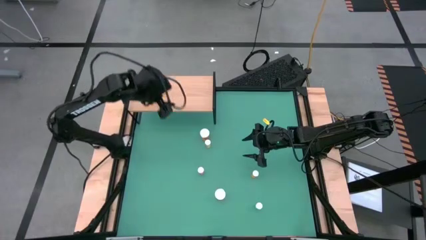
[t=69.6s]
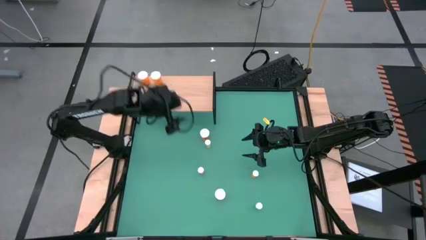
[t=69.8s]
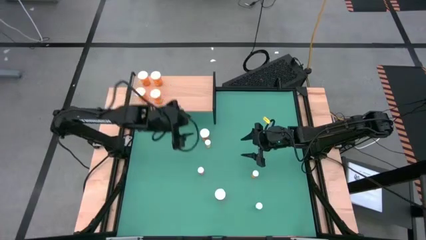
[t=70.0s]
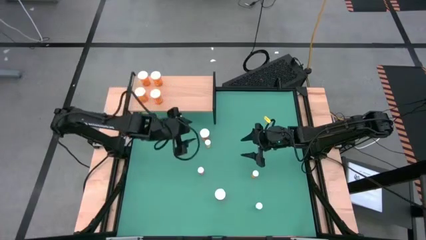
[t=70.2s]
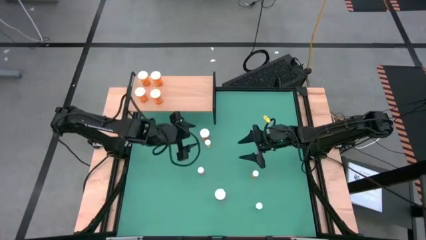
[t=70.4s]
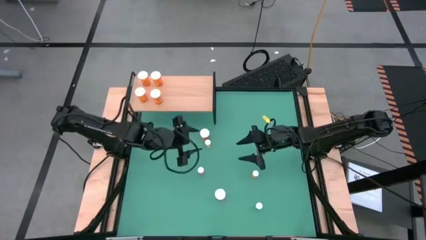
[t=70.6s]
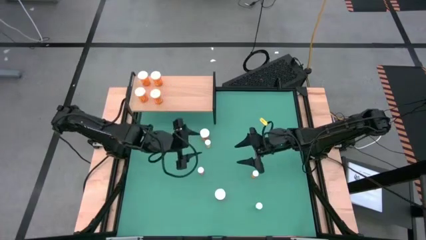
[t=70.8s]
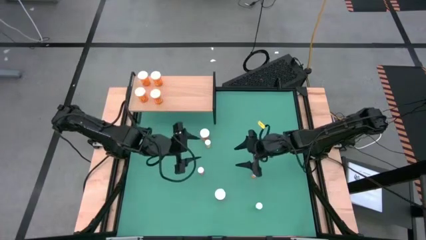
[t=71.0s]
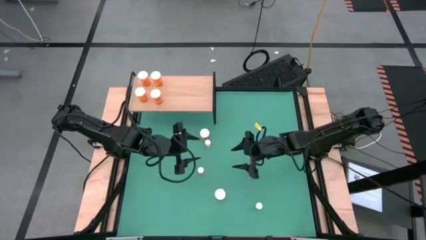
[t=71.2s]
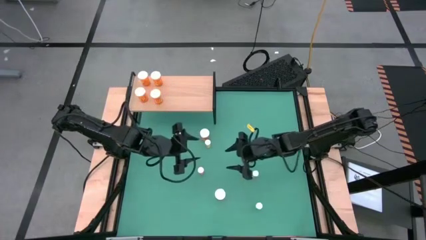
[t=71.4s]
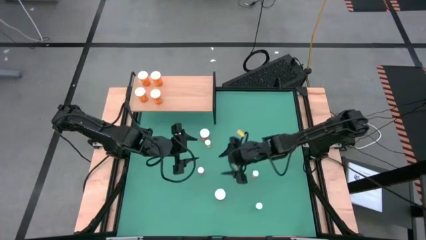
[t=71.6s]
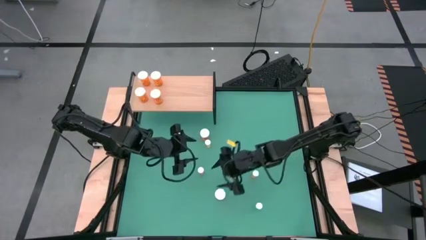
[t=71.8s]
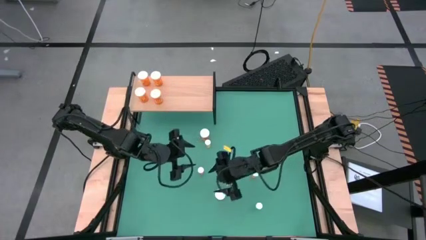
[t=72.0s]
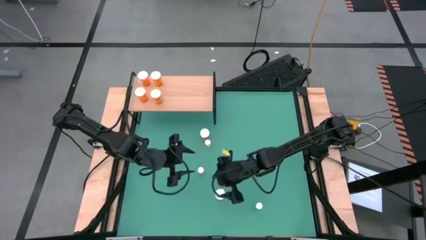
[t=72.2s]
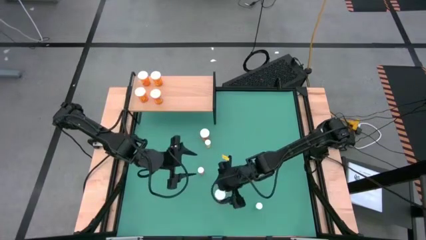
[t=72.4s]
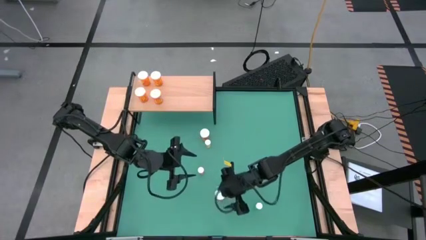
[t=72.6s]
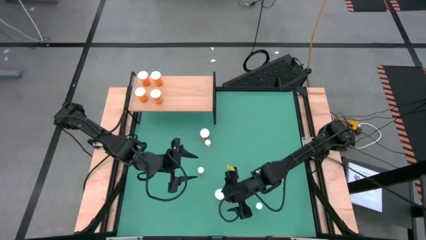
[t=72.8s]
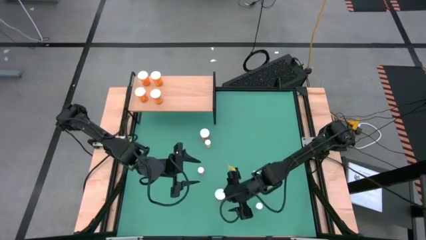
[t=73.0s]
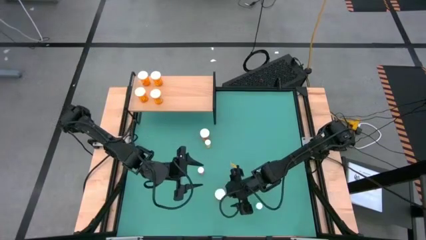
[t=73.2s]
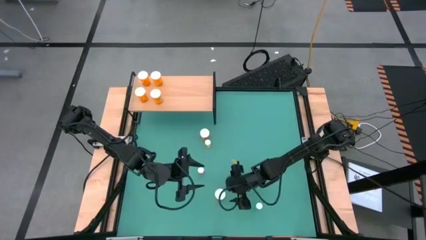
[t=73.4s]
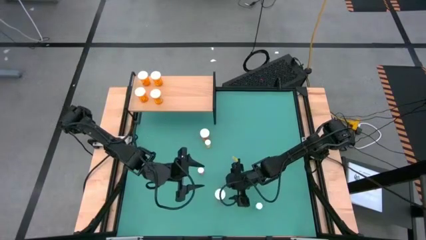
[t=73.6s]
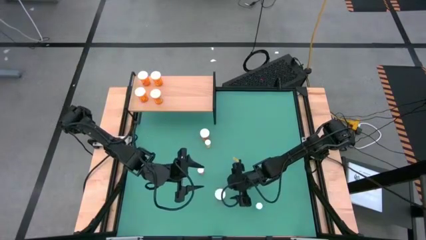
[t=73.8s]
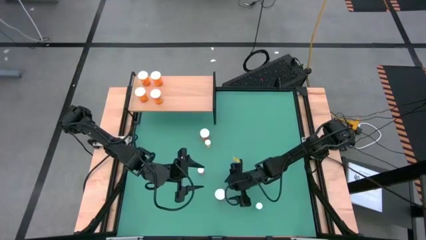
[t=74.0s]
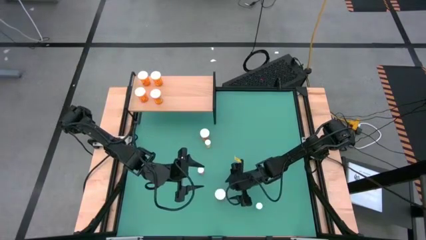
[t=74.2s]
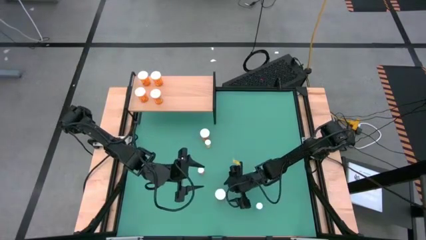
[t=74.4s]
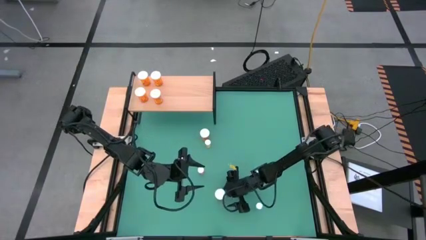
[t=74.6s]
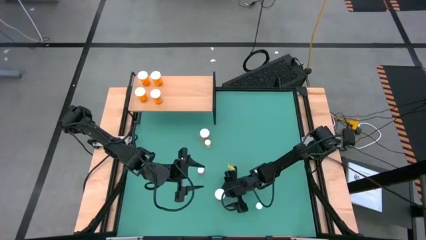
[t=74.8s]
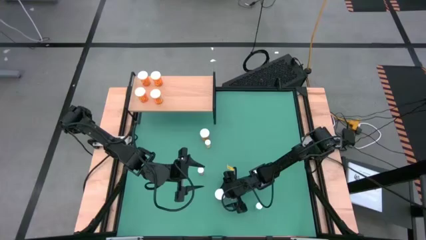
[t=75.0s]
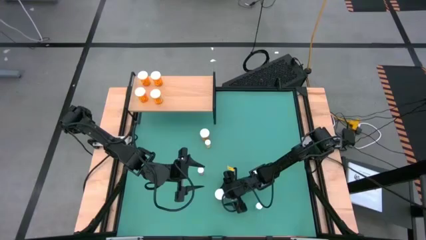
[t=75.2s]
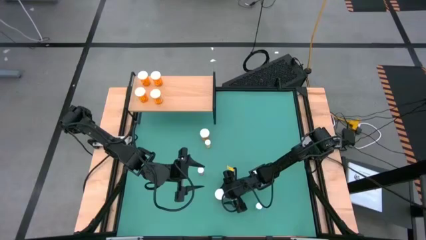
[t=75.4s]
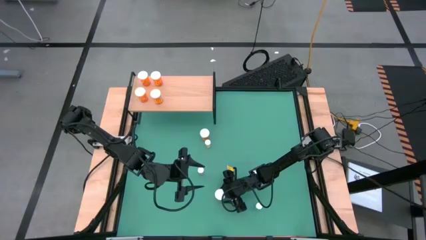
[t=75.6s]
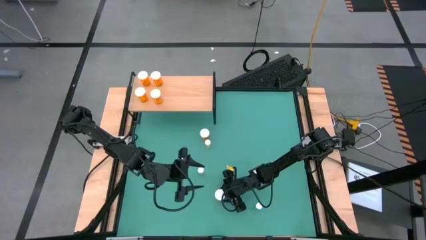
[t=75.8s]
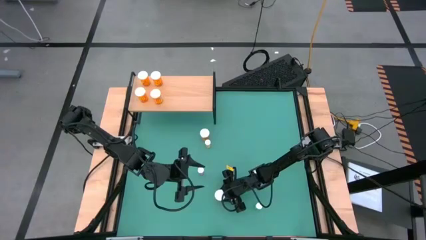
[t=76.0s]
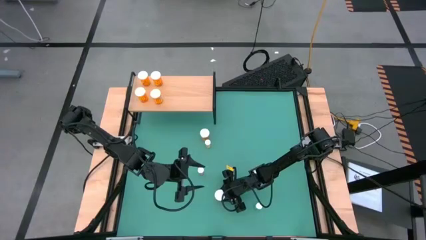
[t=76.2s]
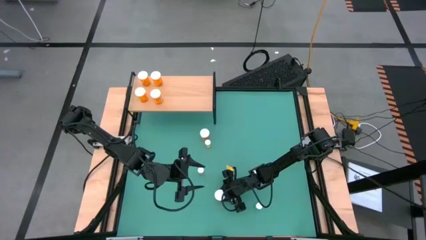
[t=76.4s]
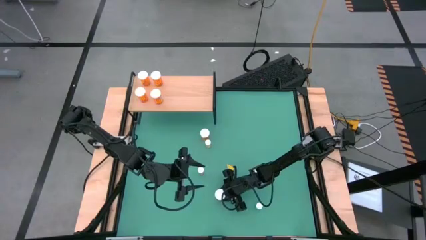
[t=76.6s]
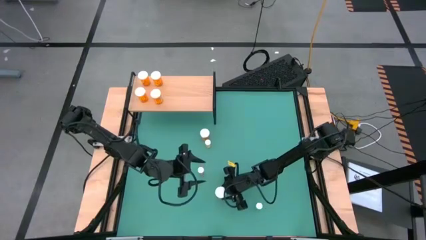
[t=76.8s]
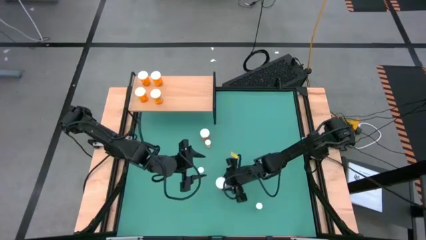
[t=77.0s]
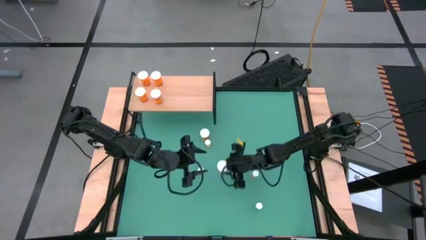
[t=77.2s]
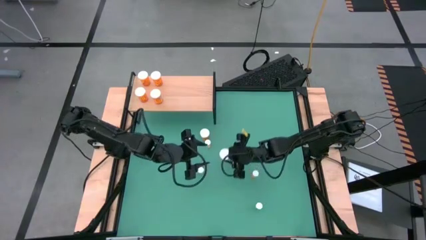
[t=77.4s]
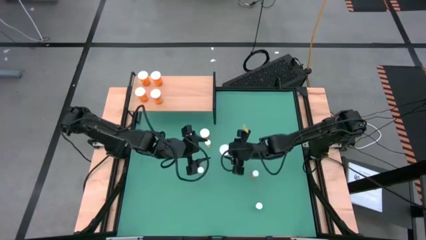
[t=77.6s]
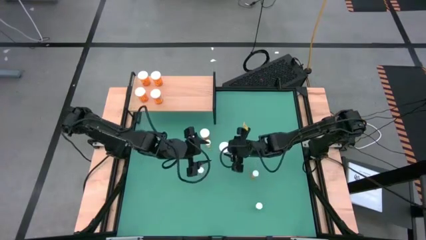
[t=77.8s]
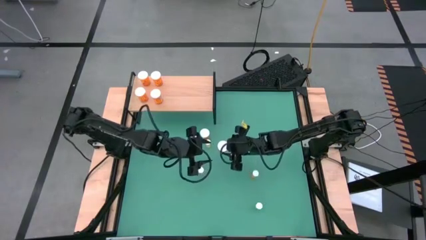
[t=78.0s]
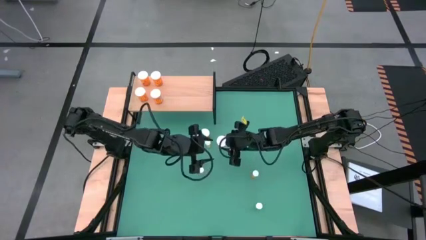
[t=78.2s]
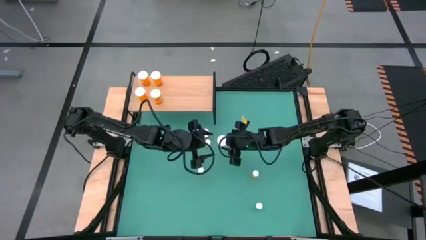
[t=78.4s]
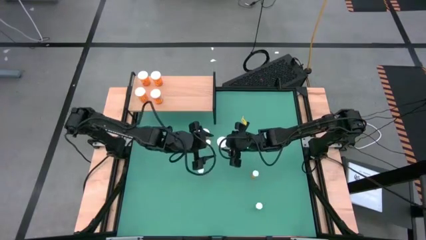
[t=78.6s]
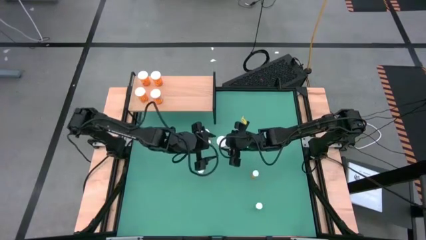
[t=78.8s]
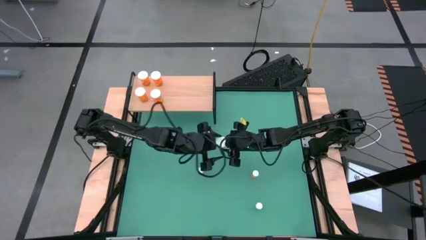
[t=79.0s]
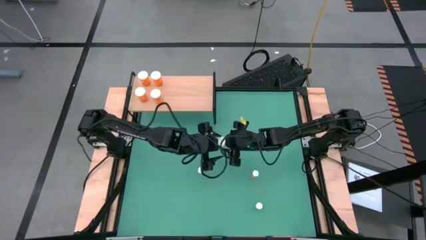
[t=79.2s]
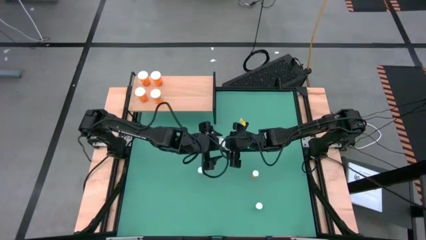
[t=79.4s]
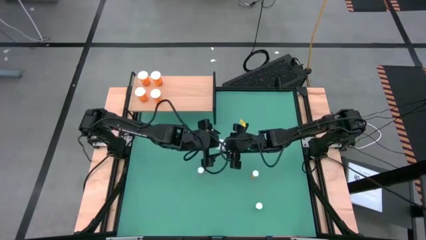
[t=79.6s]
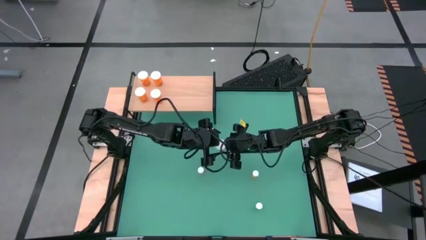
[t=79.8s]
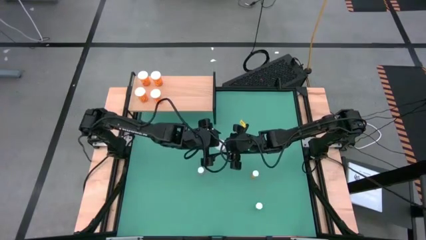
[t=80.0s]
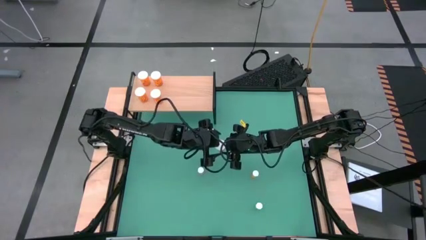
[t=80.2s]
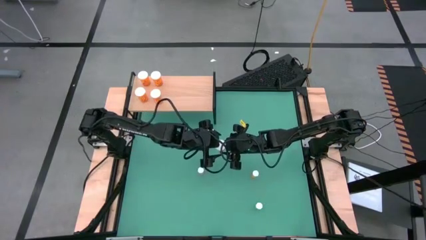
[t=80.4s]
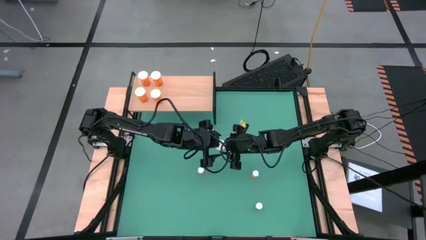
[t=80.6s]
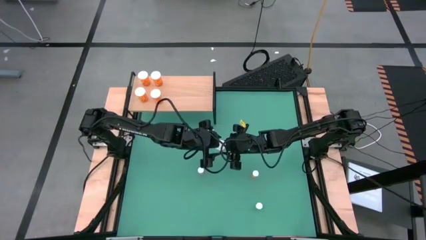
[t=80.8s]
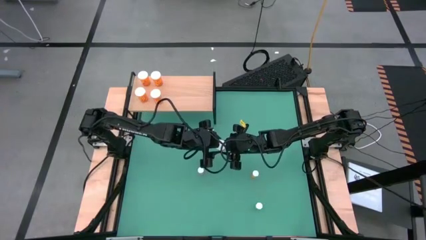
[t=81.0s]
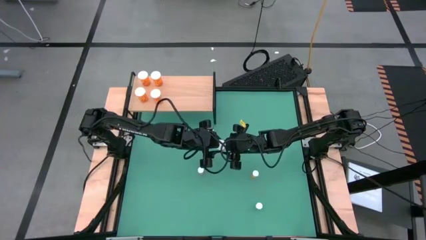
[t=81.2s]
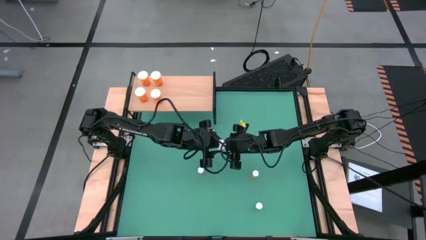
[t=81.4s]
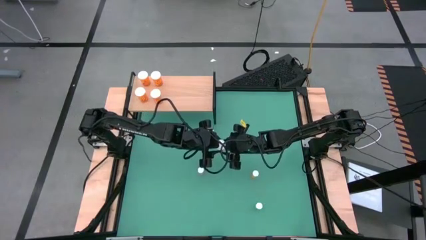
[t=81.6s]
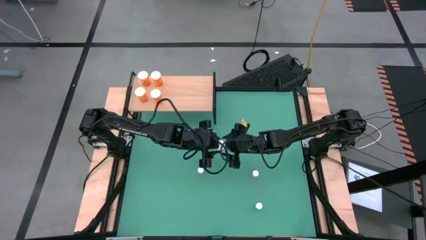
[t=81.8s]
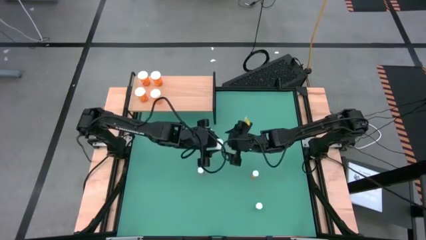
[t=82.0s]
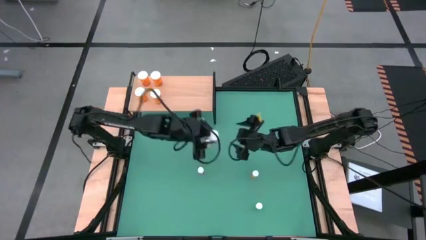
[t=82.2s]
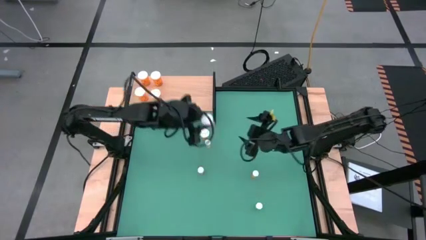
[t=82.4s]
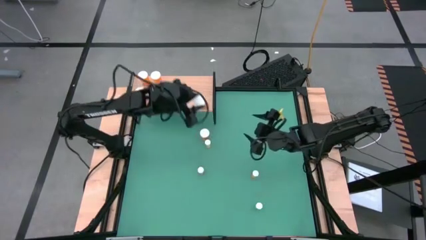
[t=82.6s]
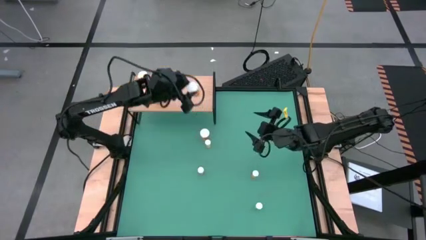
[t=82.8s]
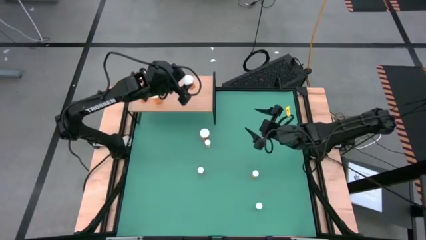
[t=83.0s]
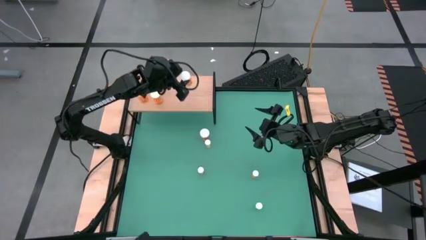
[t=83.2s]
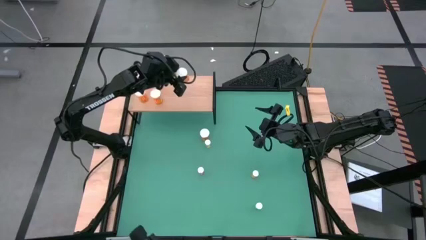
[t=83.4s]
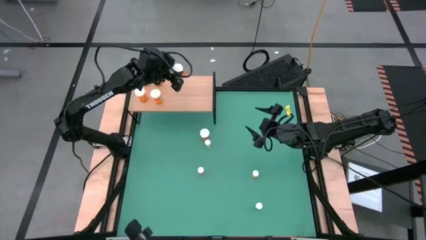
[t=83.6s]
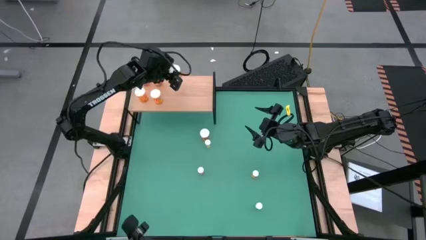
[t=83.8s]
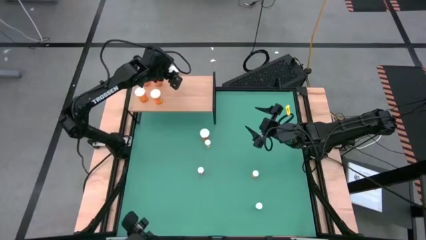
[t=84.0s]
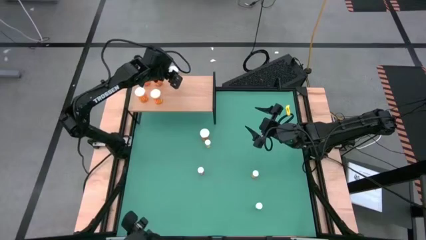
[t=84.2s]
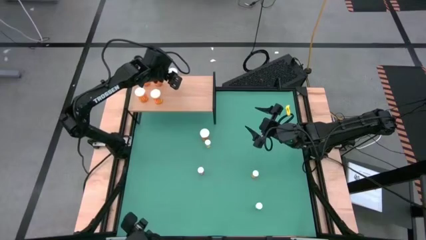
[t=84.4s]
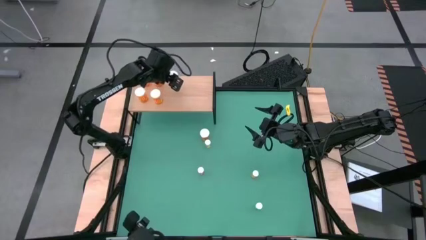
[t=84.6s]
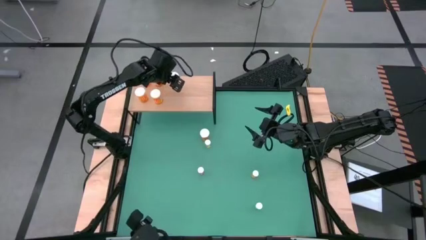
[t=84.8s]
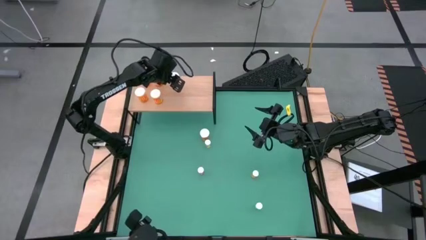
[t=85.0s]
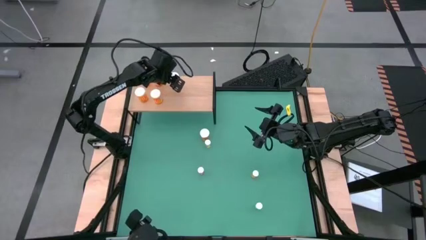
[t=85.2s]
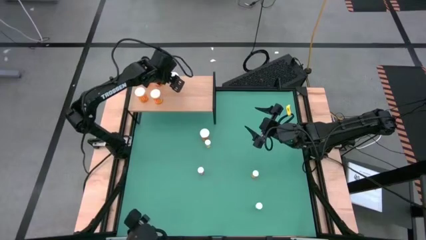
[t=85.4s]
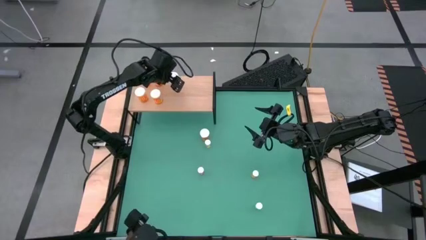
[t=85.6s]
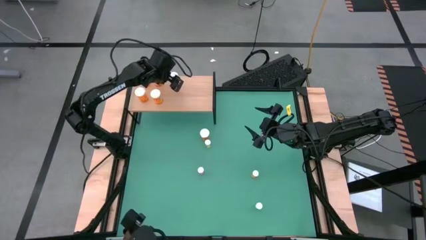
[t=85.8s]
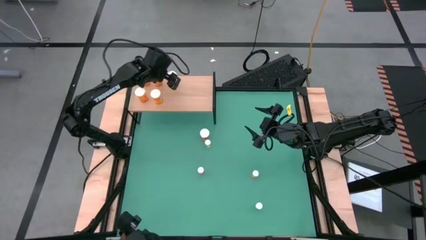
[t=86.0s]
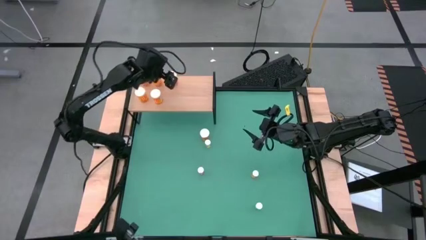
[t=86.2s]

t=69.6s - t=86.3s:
Task: Pick and place medicine bottles onto shelf by color
Put the big orange pill bottle on the shelf aligned with the other big orange pill bottle
